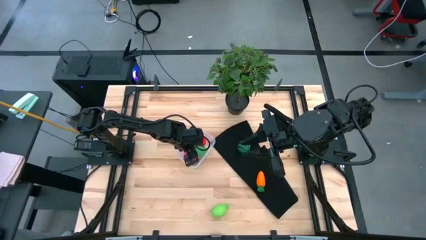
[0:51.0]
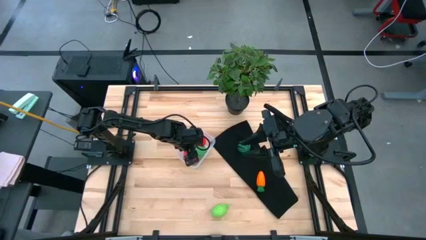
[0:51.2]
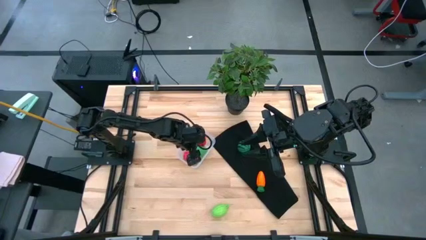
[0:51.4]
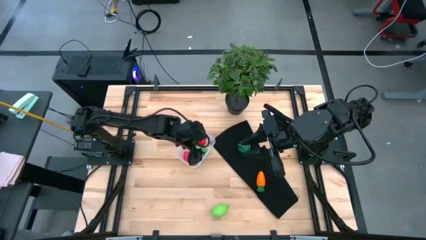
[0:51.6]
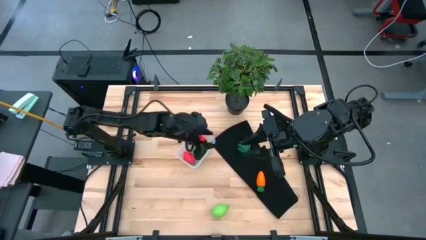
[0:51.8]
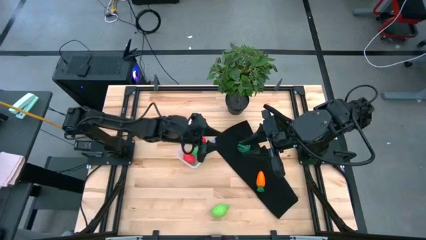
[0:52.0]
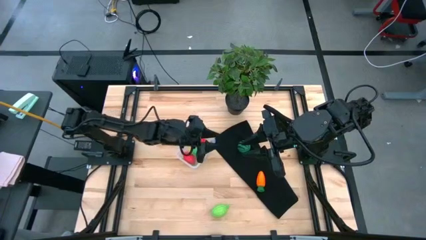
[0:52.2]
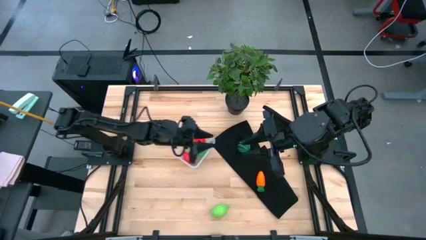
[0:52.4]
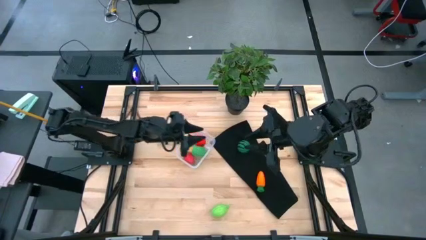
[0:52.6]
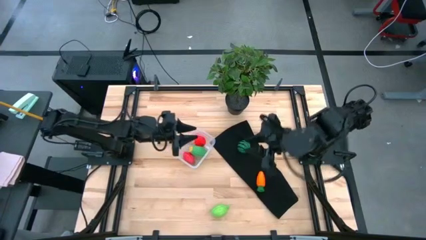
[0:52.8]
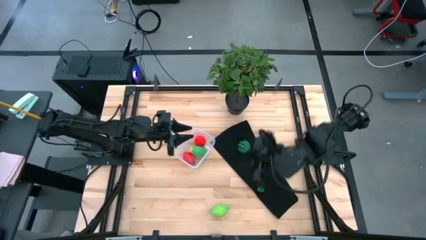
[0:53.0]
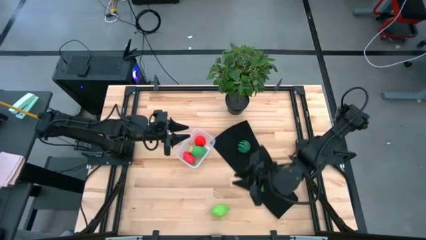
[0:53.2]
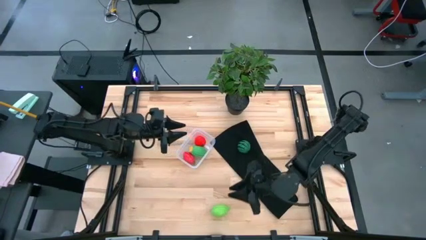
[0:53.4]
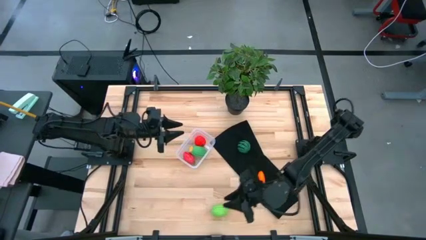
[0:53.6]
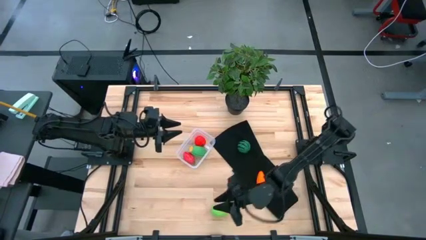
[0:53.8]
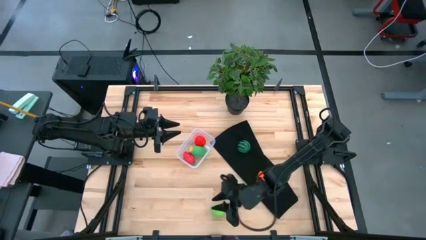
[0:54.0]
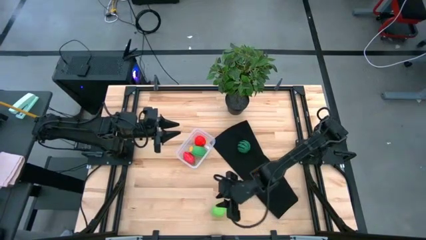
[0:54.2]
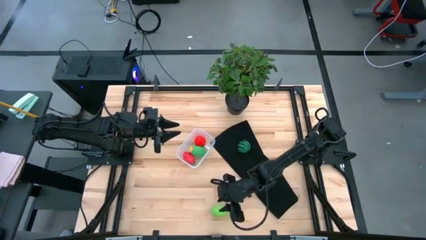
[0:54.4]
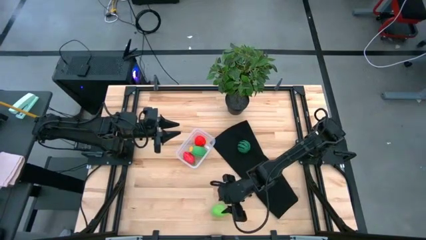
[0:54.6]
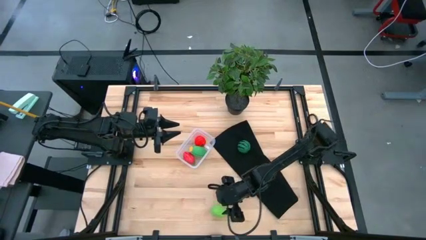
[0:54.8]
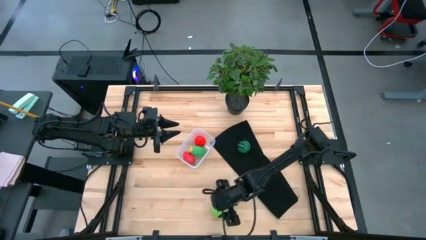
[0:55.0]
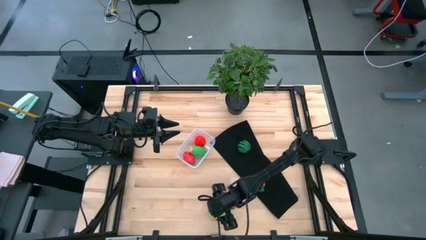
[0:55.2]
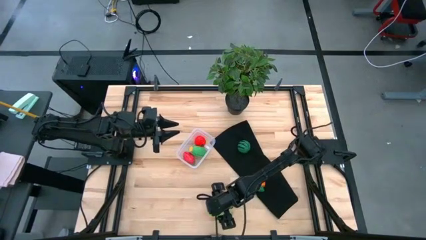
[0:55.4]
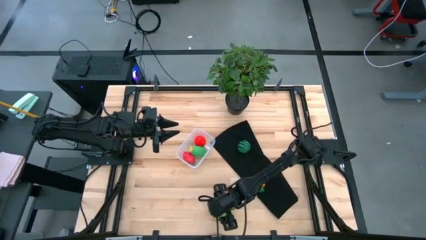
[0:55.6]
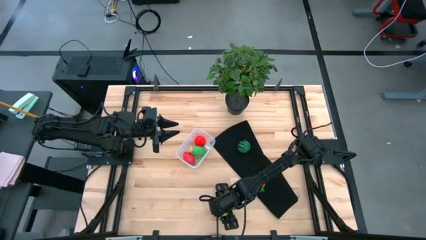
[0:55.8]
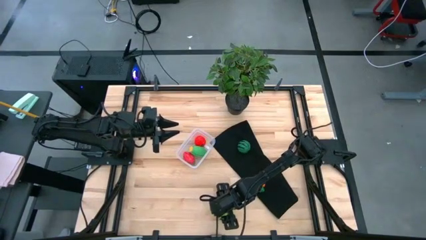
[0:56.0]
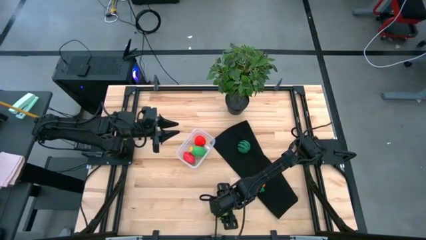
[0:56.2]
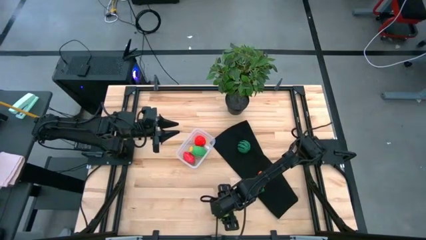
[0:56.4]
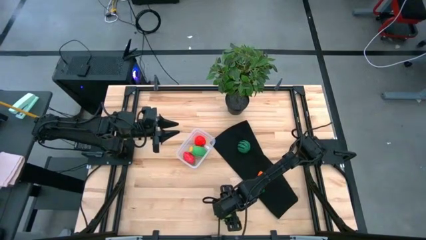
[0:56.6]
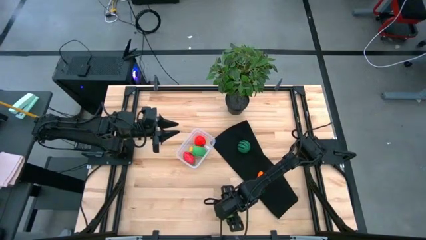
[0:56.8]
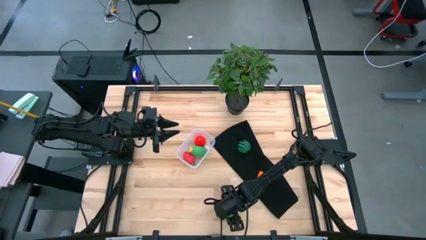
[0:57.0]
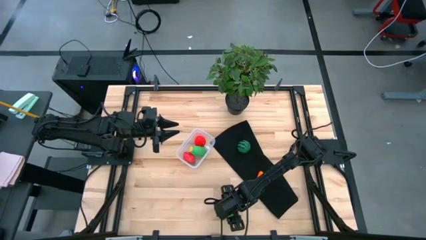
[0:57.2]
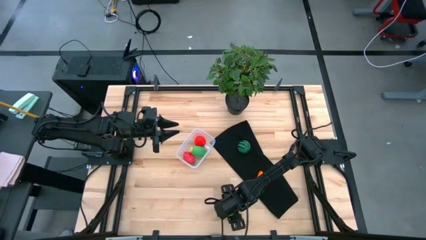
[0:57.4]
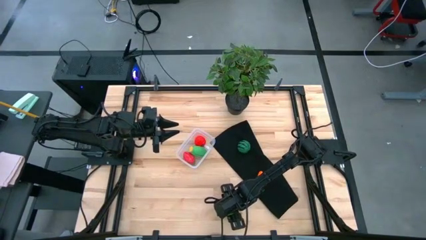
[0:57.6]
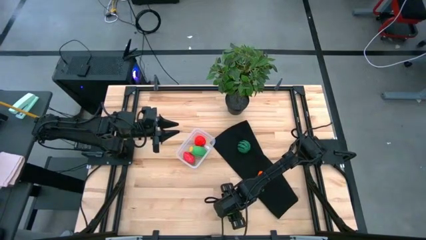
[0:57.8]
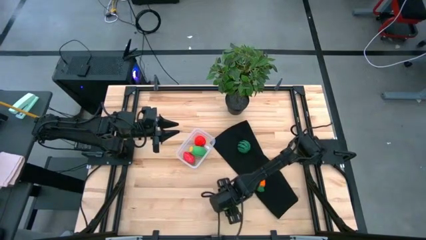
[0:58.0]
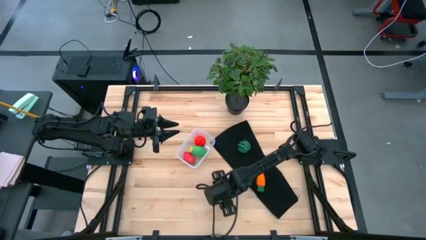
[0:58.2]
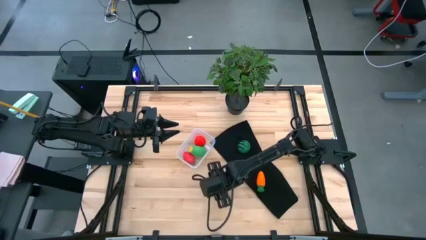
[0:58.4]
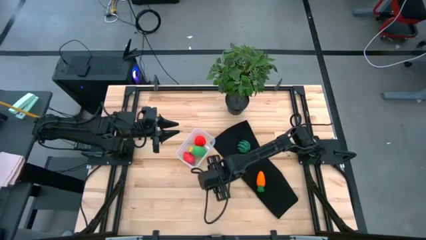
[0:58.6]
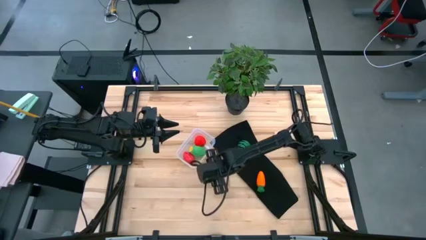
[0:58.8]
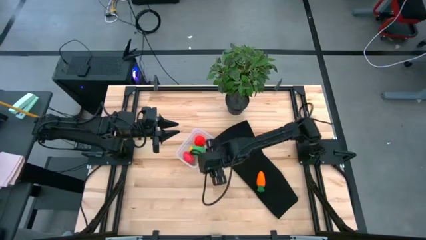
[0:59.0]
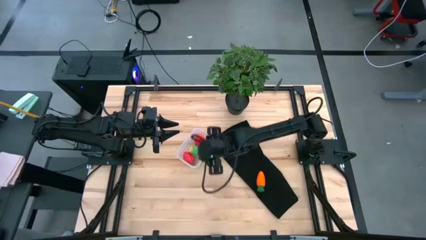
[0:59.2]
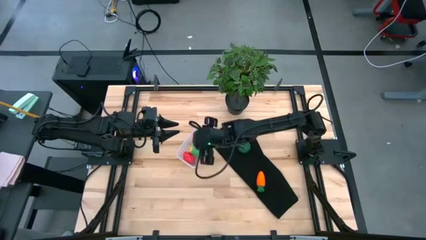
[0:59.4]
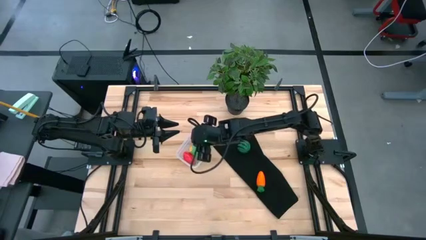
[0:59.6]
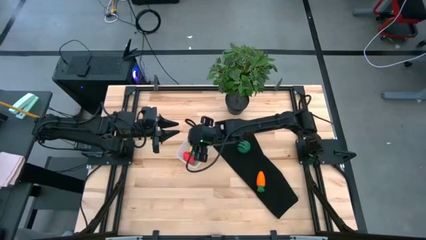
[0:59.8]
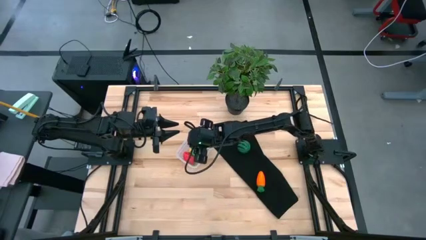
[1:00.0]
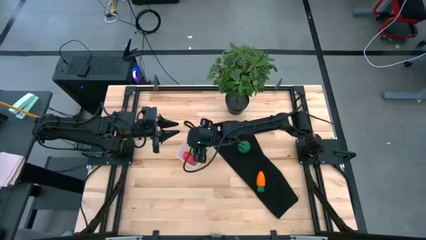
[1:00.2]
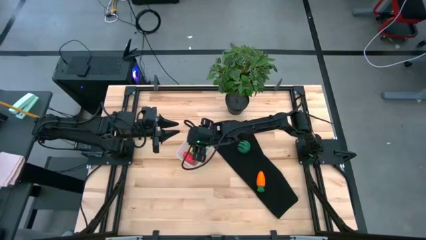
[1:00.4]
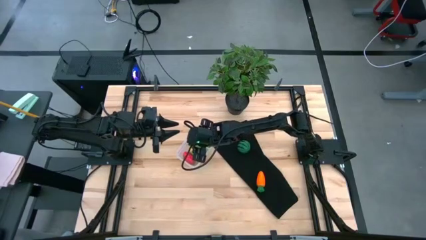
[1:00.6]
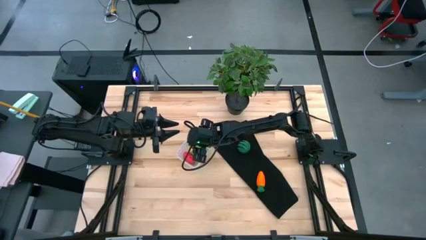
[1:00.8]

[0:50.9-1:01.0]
Task: Pick and placing Produce into tupperware
Put the green lemon into the transparent bin

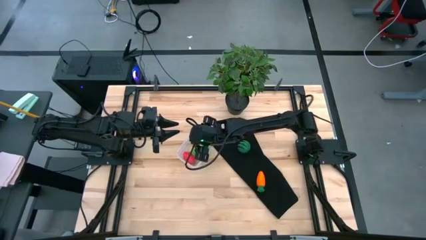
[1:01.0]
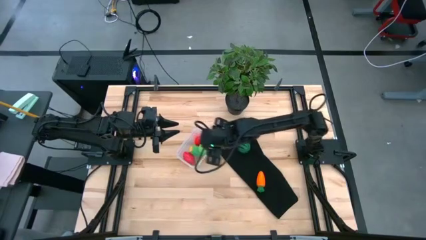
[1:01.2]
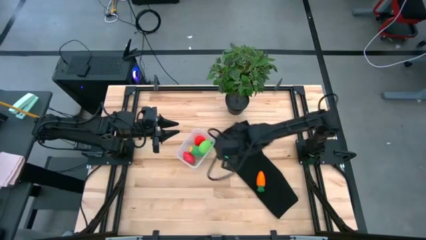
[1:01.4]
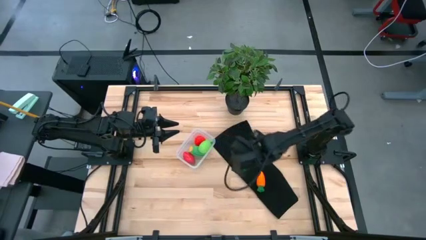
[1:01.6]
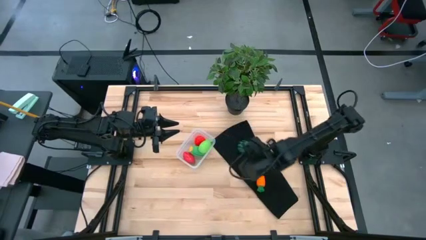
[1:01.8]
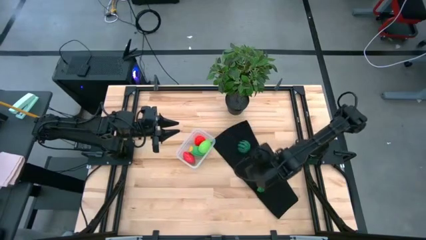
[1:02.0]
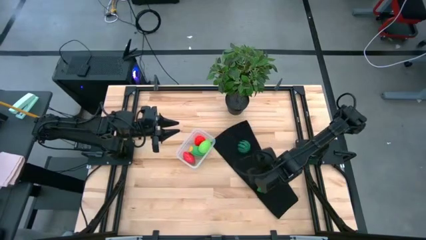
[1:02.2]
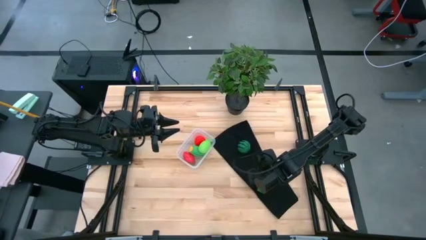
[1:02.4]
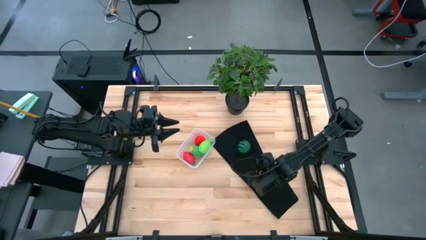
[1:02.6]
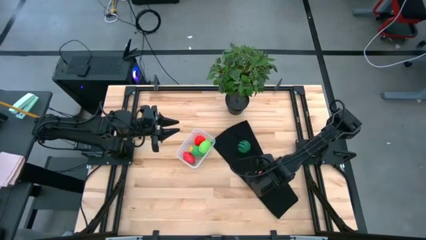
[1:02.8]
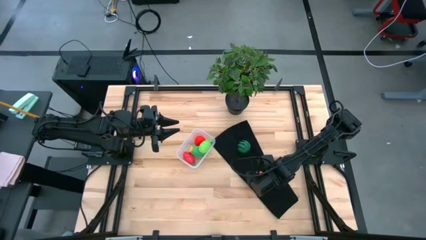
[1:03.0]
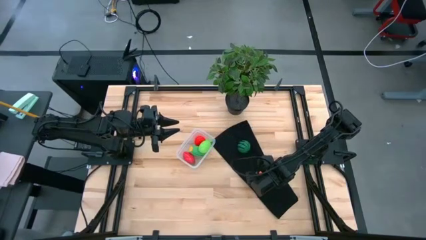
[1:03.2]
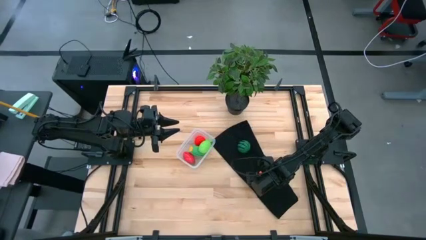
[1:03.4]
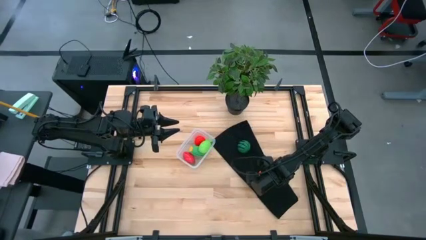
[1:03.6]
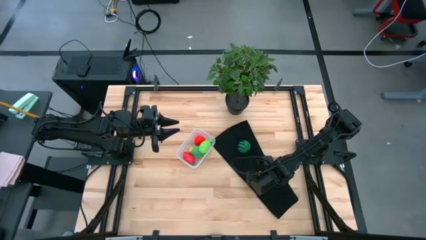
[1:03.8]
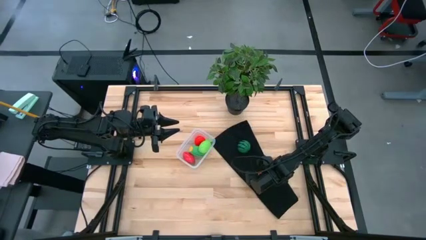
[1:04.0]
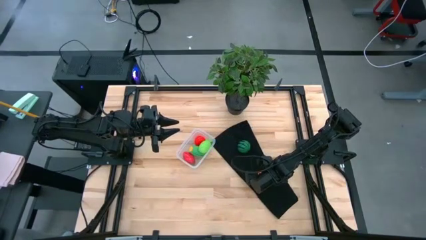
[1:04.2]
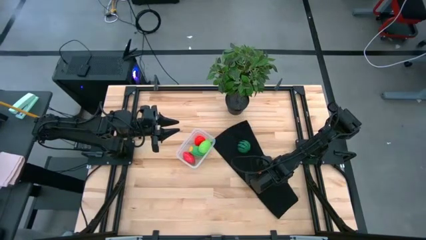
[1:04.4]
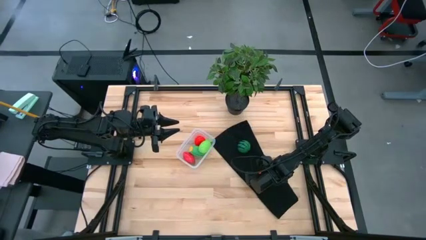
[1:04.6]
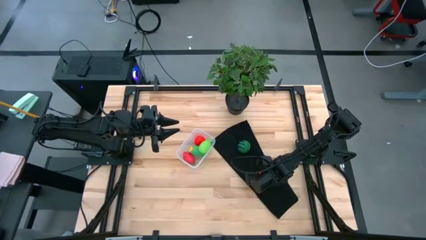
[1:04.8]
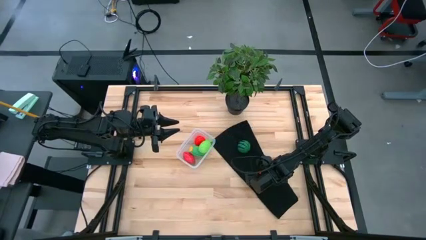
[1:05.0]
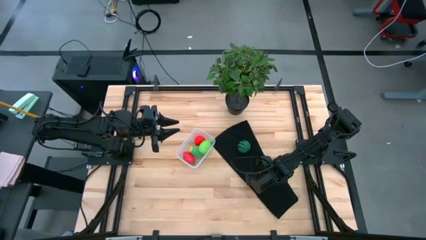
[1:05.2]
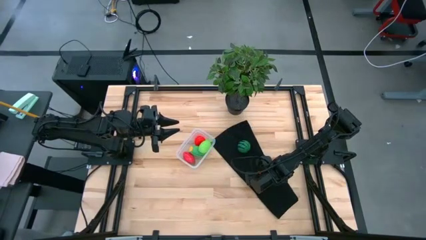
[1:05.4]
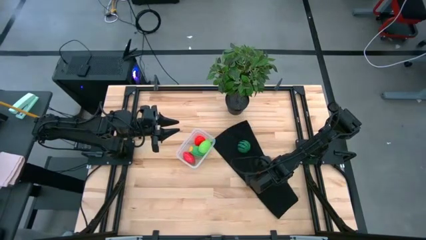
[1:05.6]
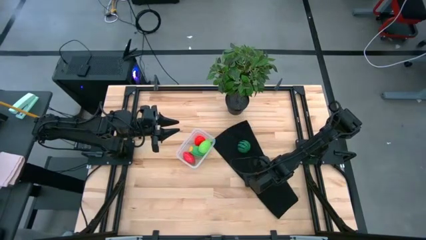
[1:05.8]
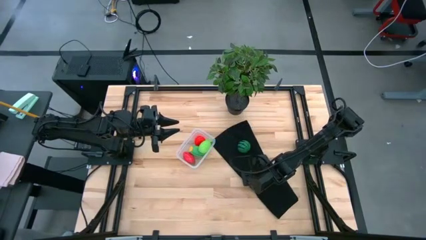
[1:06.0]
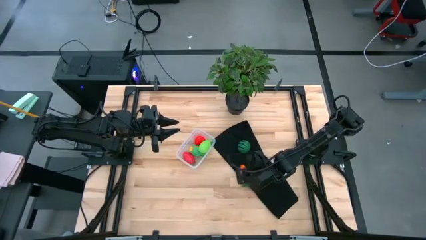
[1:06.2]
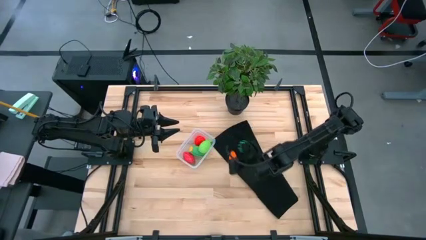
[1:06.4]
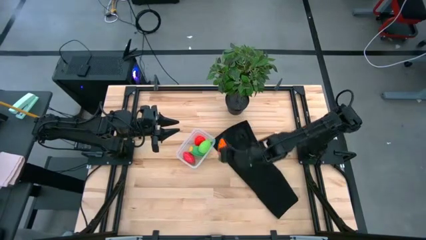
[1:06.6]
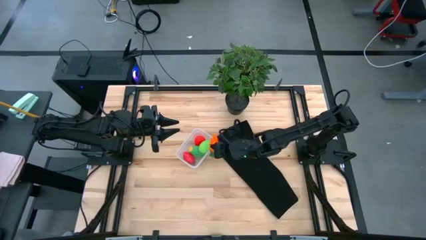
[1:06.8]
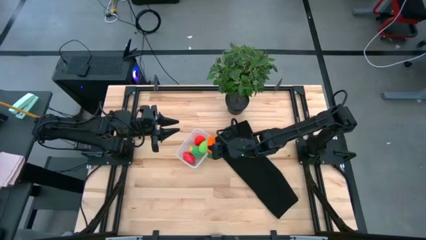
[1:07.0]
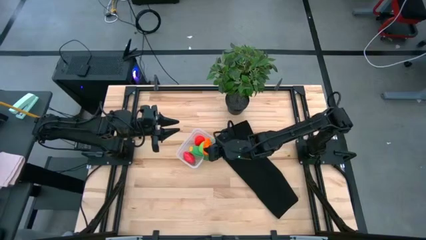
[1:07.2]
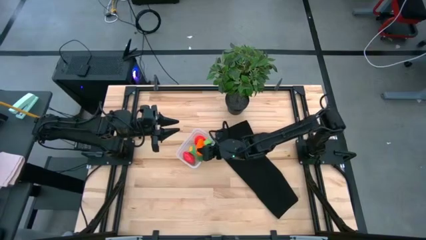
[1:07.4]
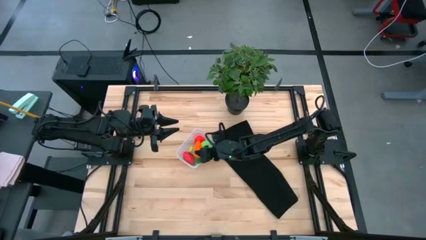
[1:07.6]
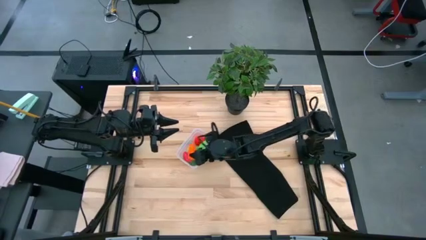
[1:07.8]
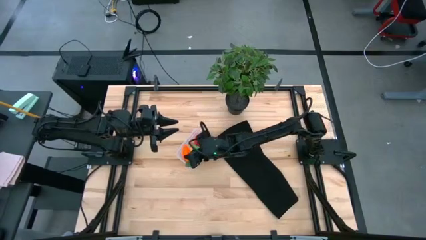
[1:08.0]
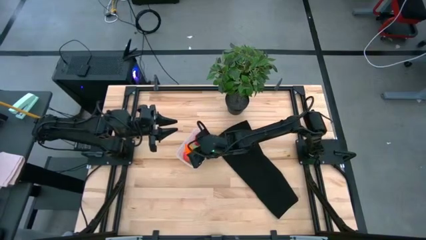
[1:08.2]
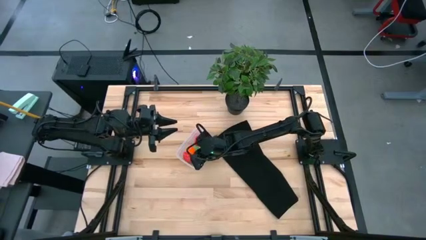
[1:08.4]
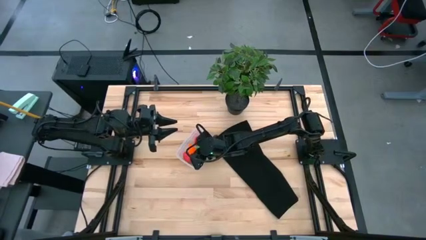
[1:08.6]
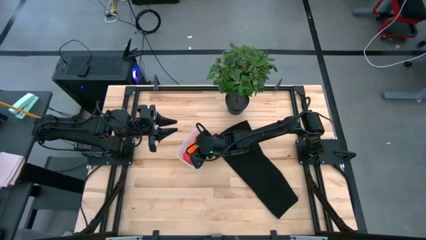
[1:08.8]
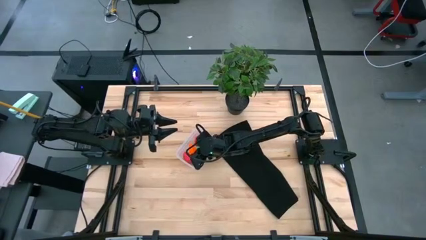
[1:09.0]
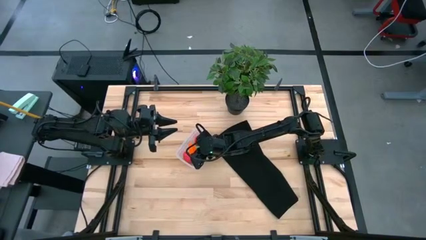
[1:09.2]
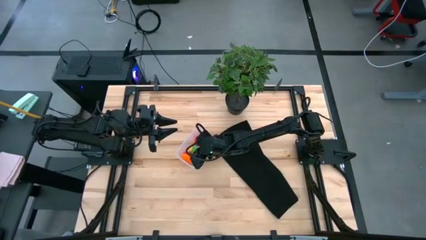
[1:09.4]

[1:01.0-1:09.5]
Put the orange carrot into the transparent bin
